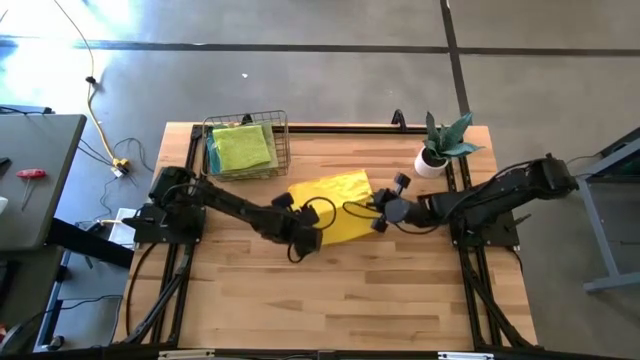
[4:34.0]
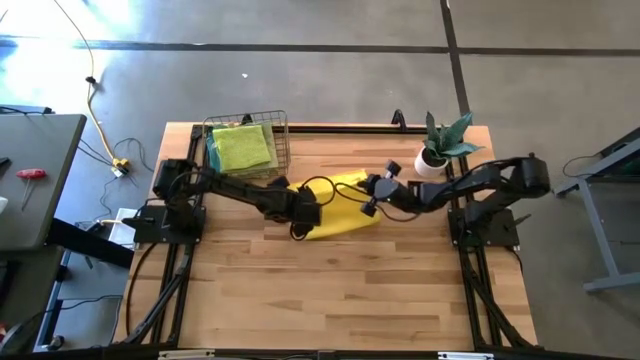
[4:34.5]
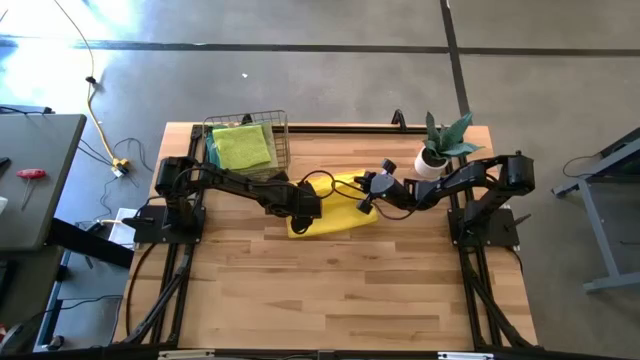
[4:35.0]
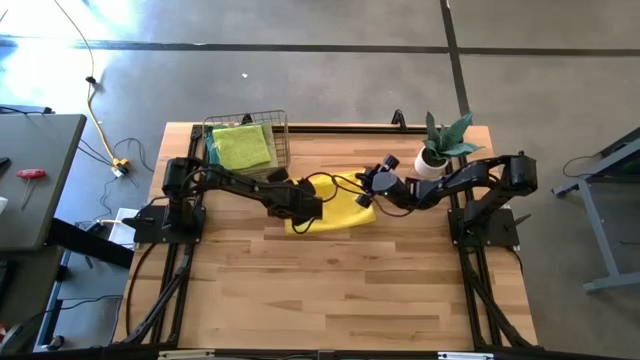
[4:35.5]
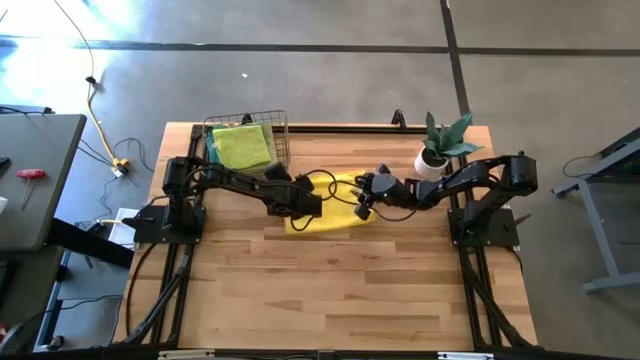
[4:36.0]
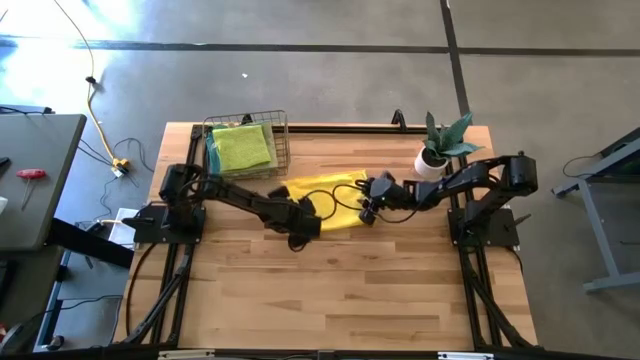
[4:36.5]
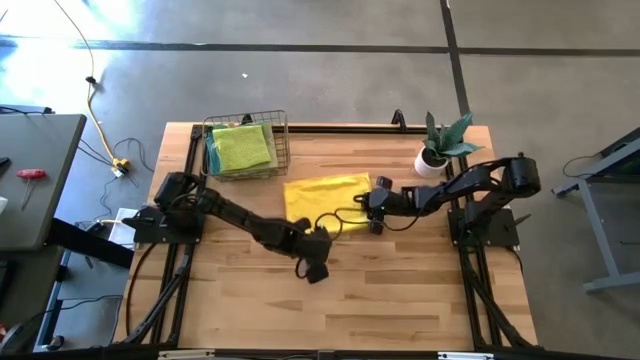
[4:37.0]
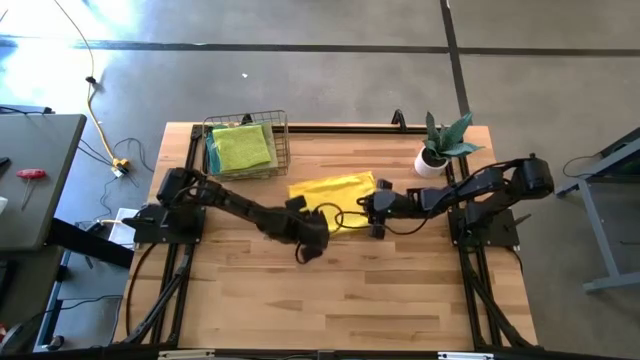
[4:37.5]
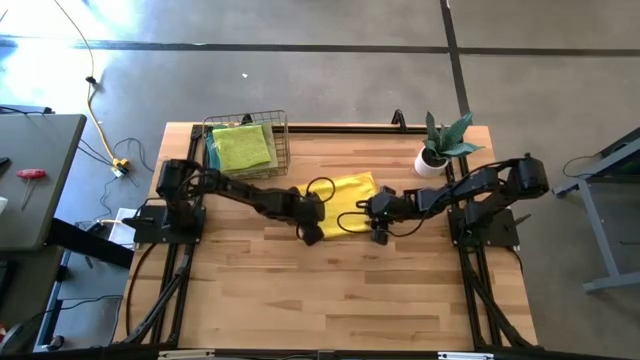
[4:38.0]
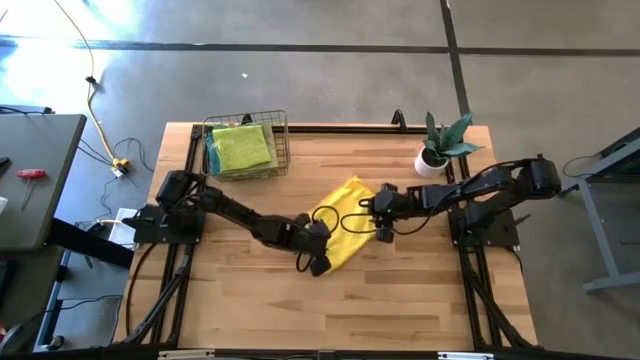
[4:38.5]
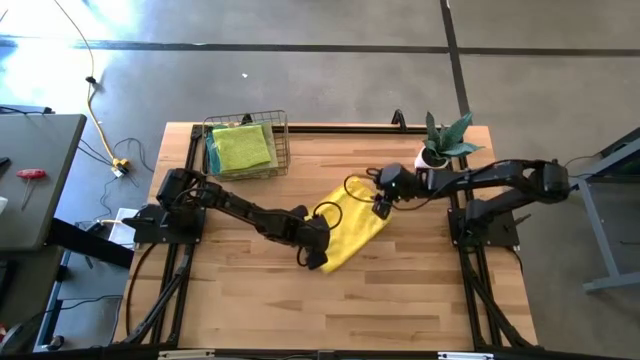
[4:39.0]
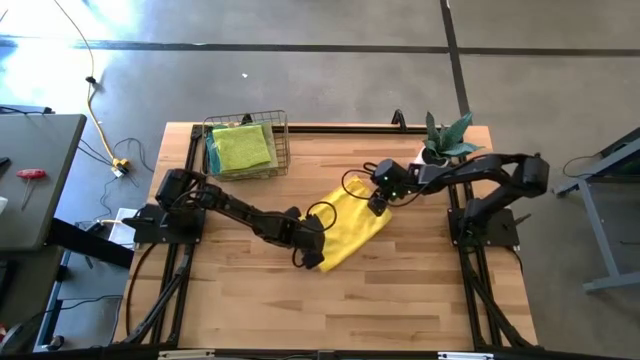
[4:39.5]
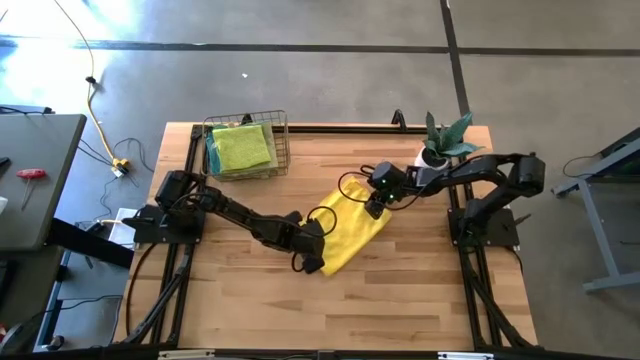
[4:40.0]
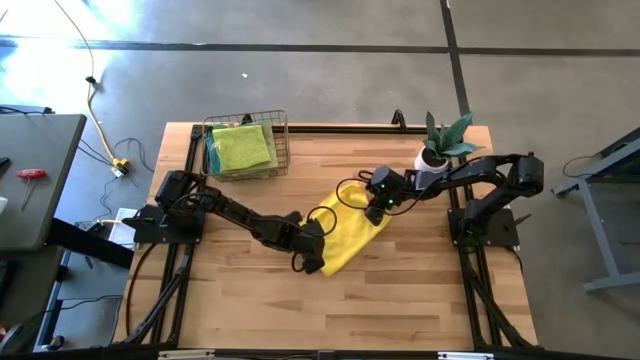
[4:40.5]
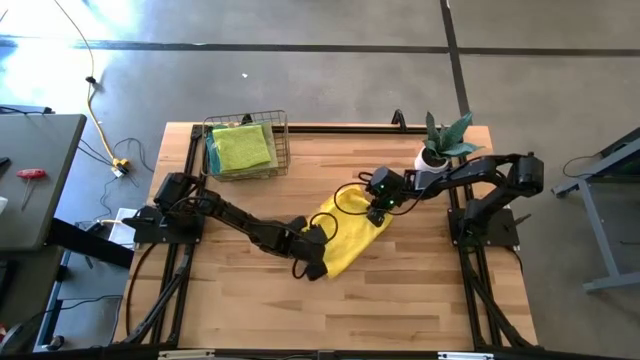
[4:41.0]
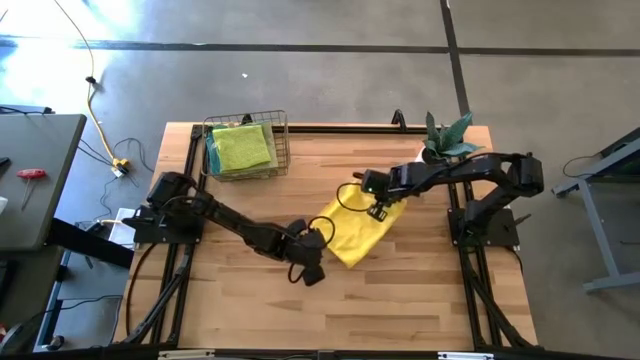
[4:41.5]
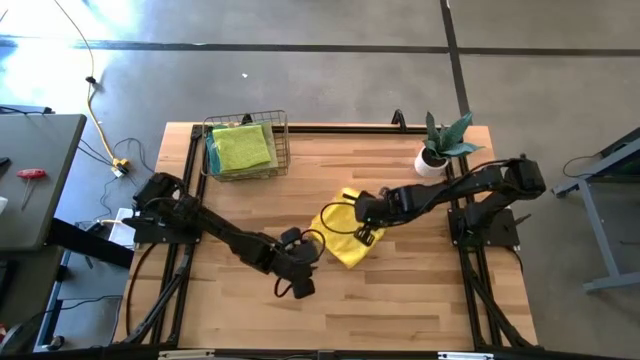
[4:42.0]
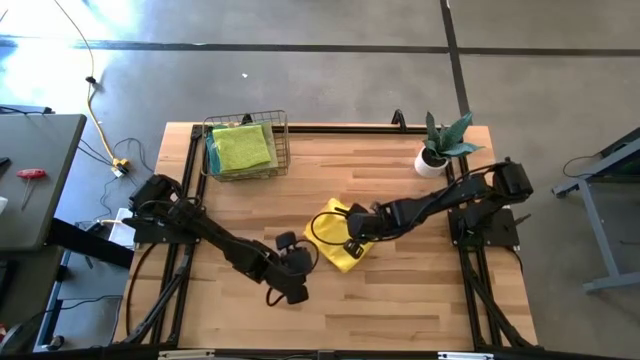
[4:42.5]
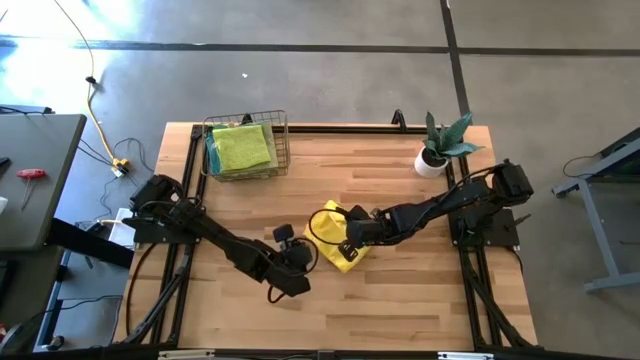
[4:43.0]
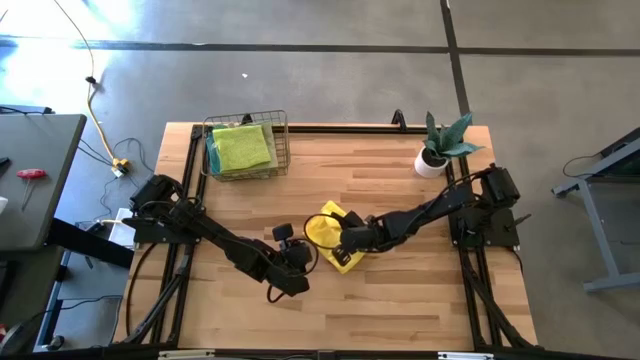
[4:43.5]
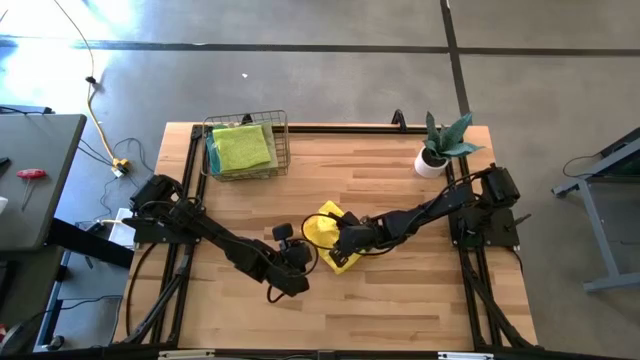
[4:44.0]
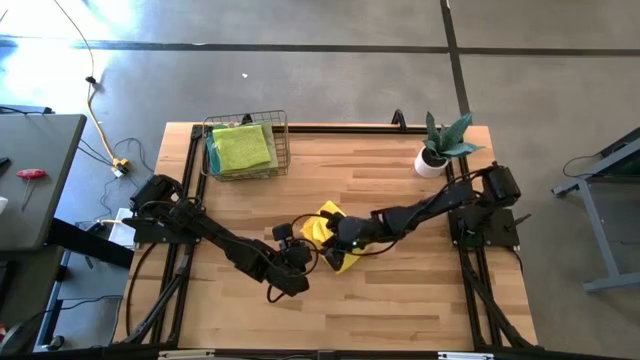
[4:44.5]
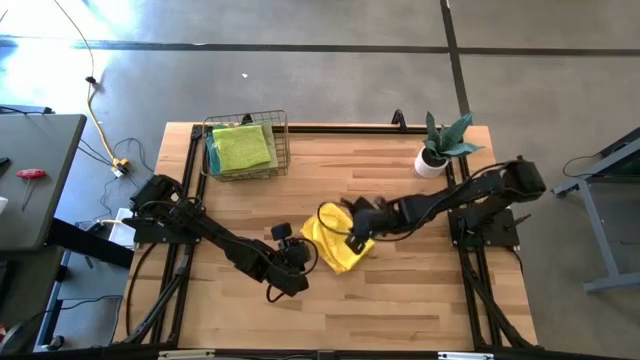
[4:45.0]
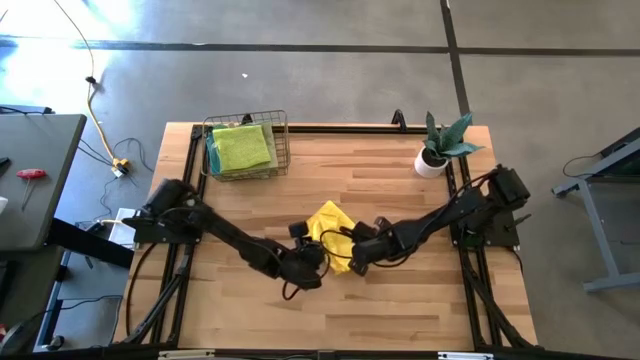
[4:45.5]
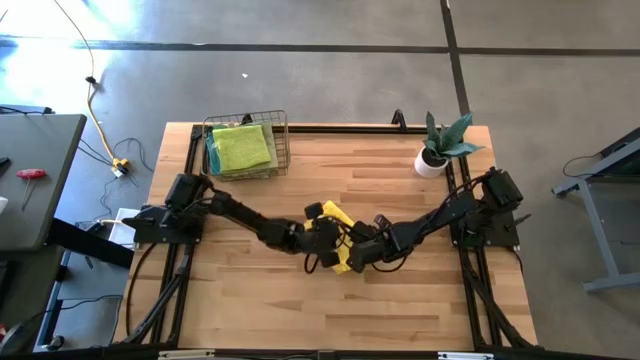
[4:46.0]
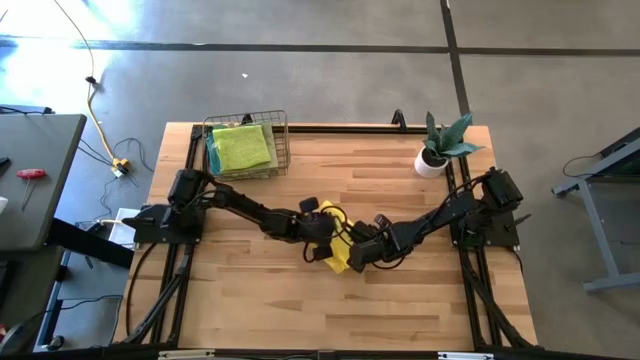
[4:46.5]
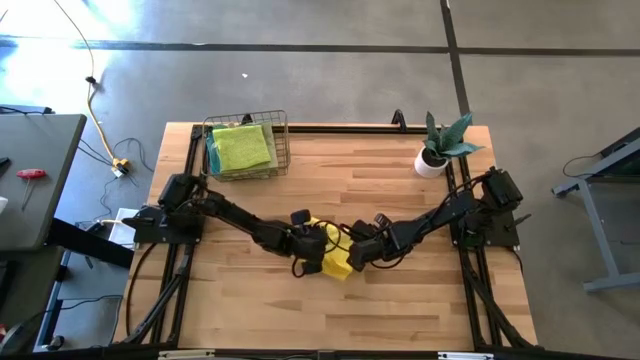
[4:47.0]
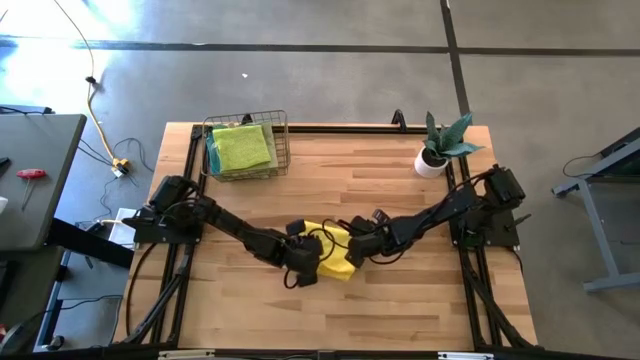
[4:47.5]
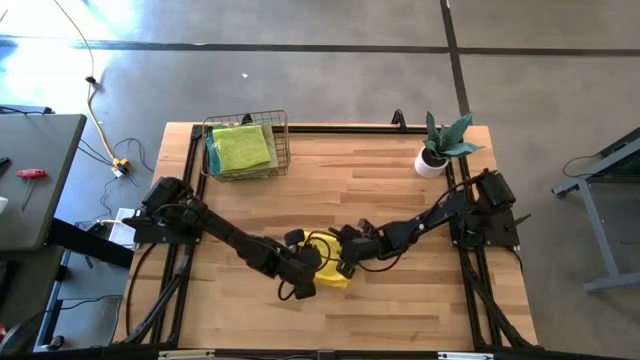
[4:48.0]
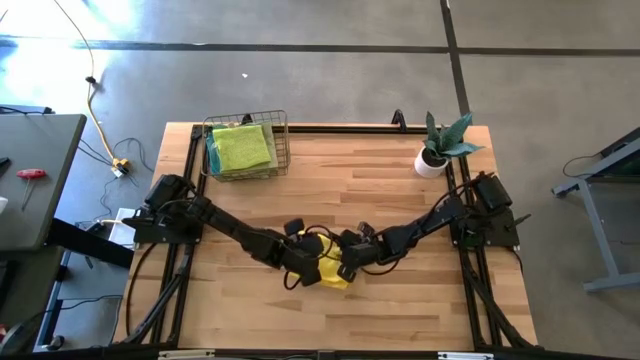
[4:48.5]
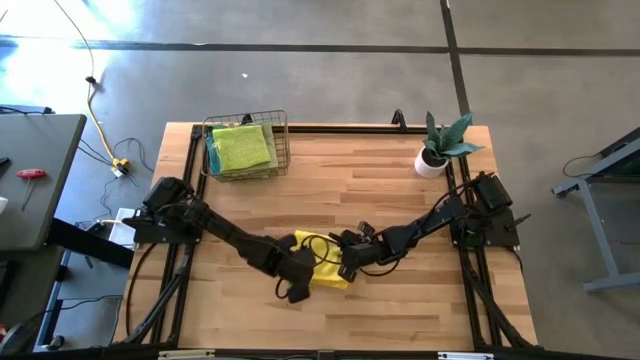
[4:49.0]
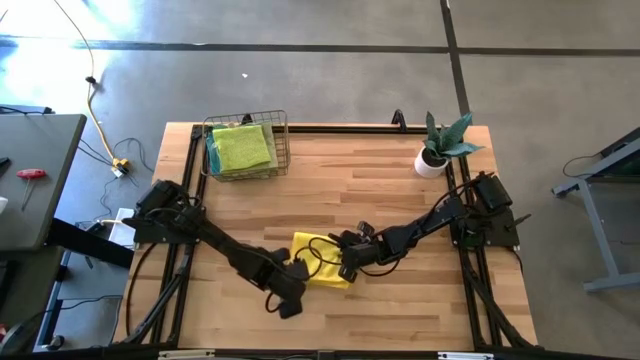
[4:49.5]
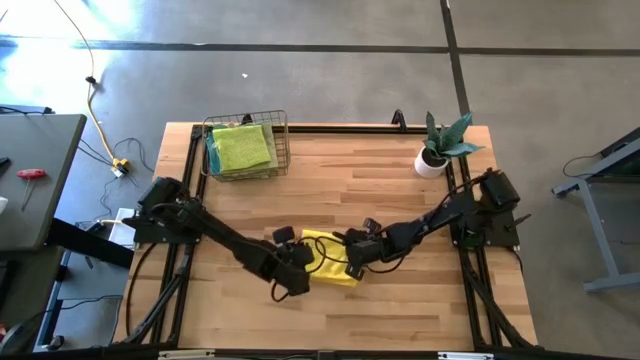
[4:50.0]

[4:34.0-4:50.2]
Task: Fold microfiber towels
Fold the yellow towel

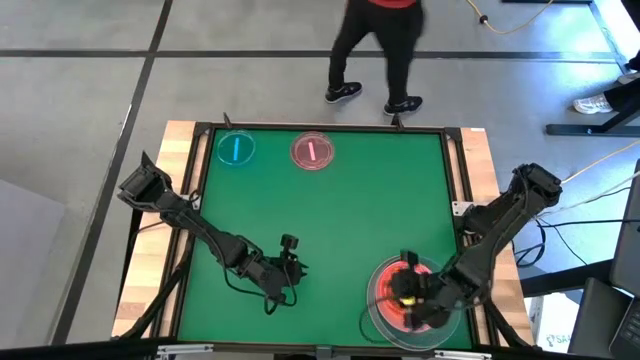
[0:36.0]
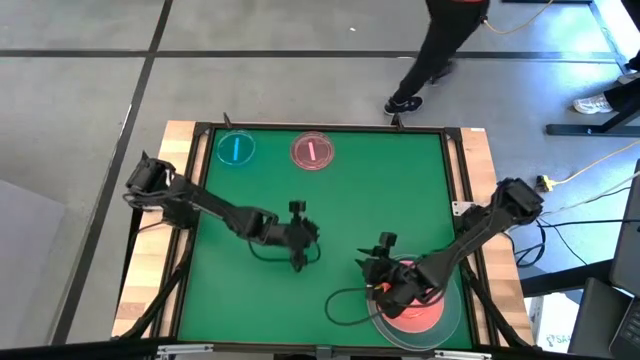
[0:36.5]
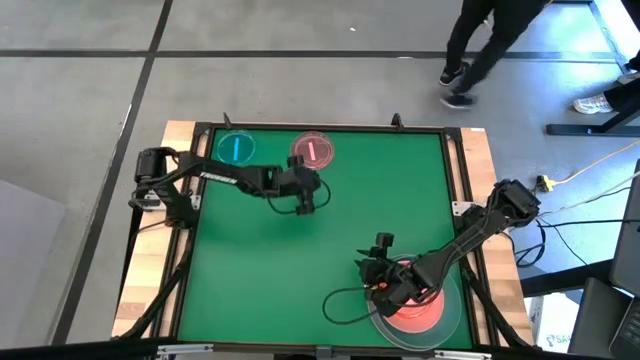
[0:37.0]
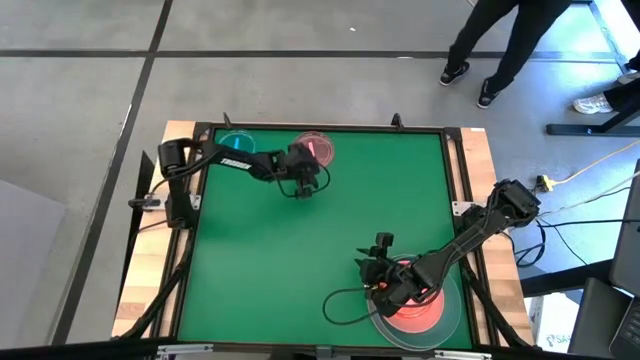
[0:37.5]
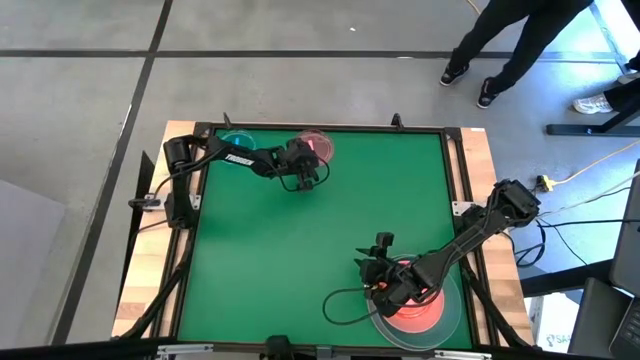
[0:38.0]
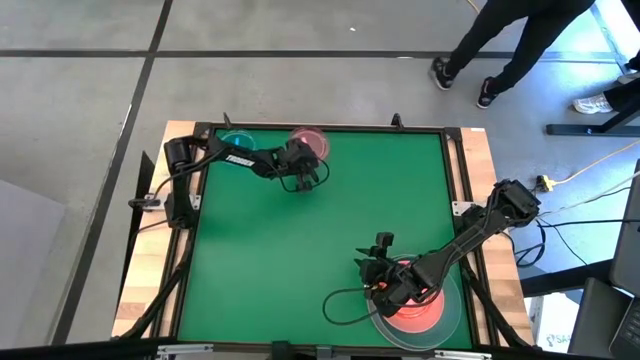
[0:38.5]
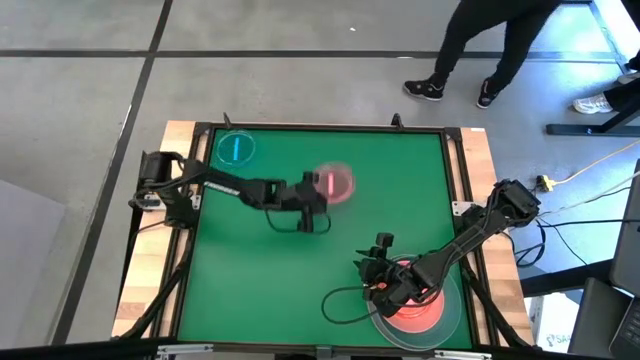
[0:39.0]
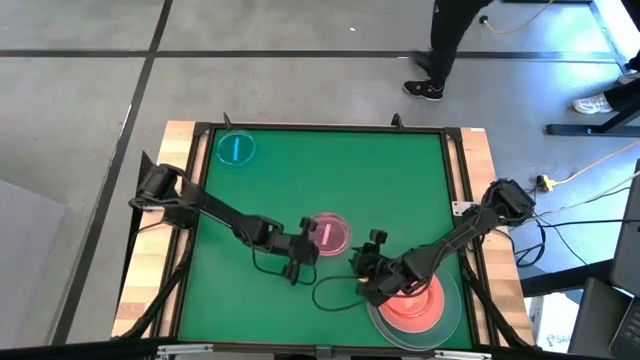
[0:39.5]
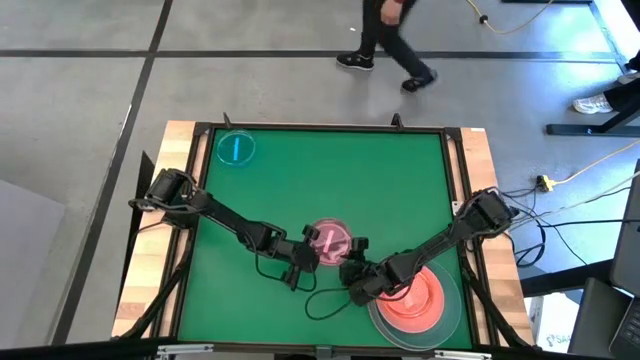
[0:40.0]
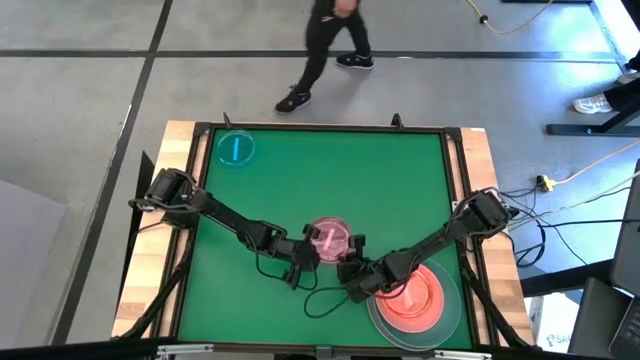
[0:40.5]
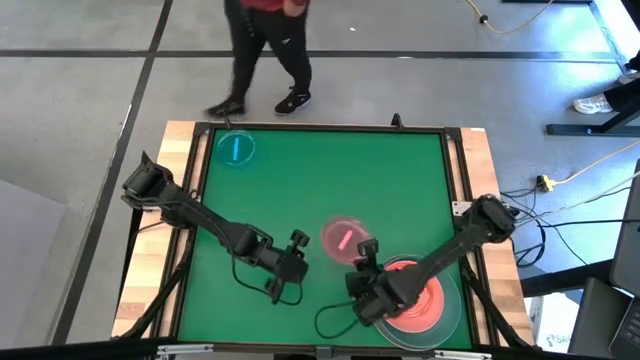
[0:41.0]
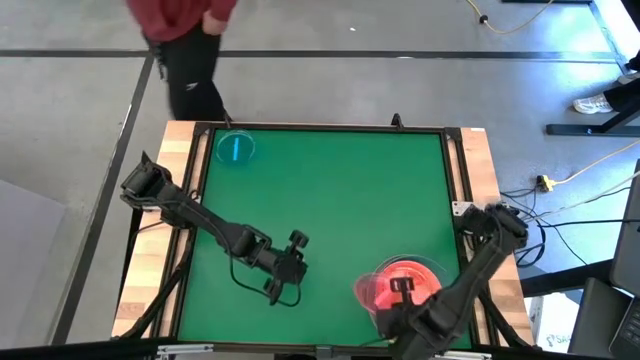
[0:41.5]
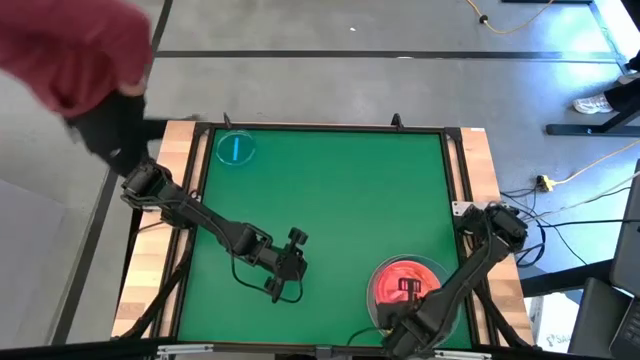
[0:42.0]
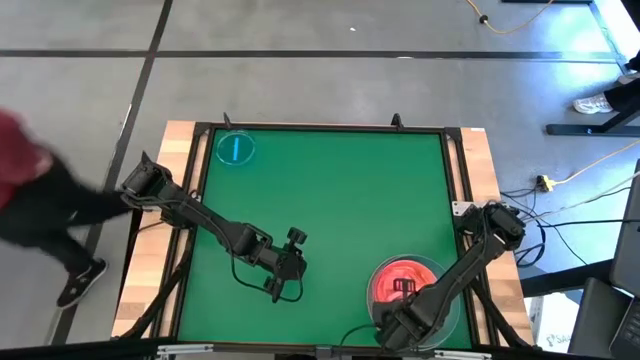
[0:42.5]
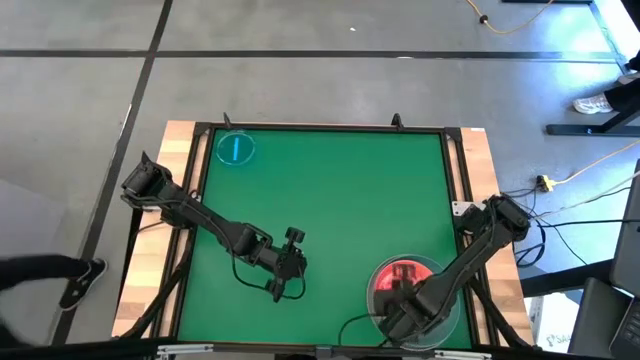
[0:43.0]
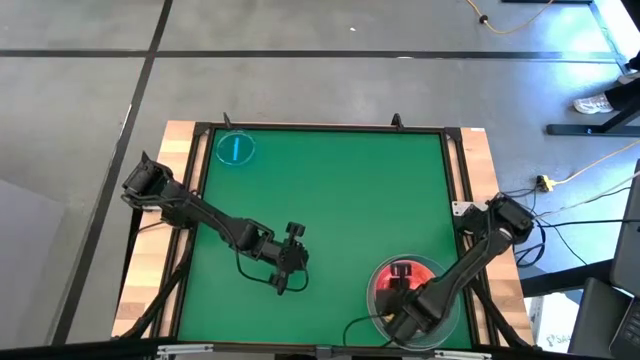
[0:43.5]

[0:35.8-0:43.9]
Task: Stack plastic plates
Stack the transparent pink plate on top of the transparent pink plate
